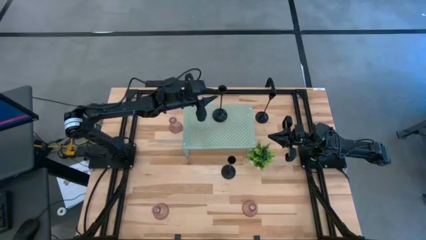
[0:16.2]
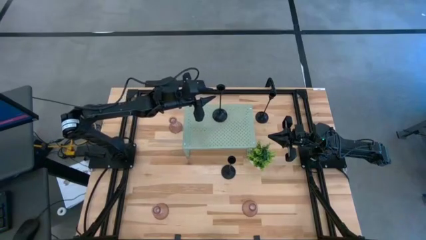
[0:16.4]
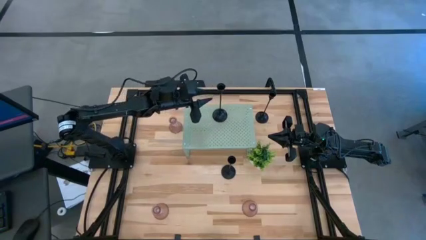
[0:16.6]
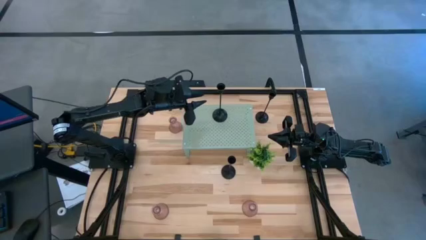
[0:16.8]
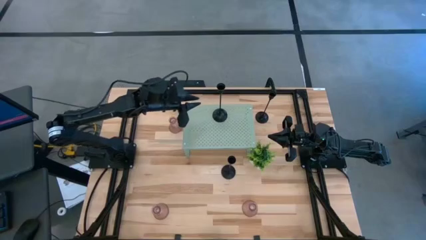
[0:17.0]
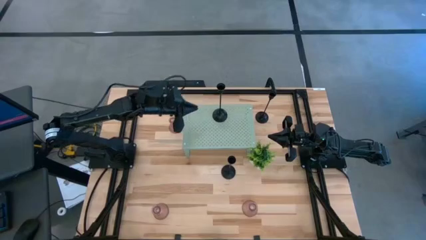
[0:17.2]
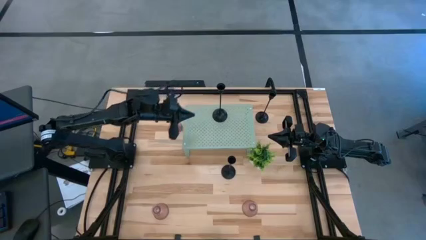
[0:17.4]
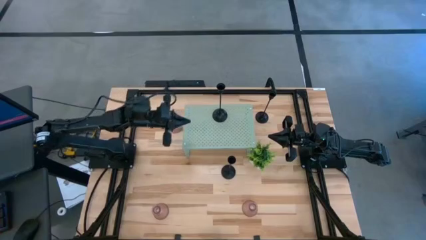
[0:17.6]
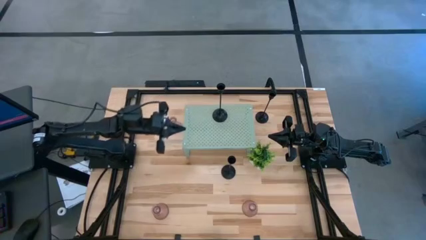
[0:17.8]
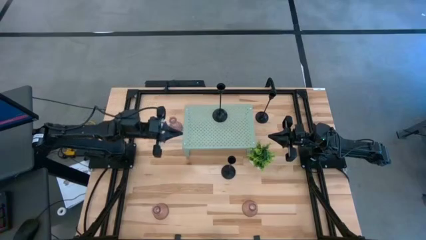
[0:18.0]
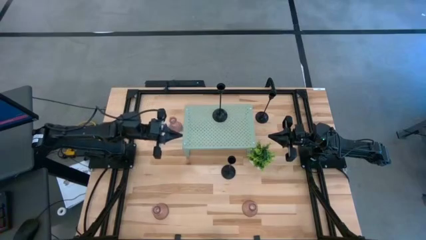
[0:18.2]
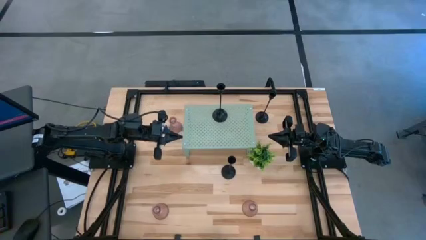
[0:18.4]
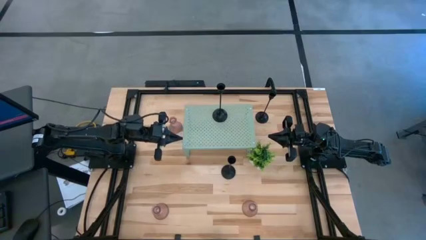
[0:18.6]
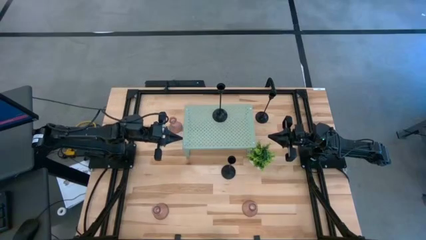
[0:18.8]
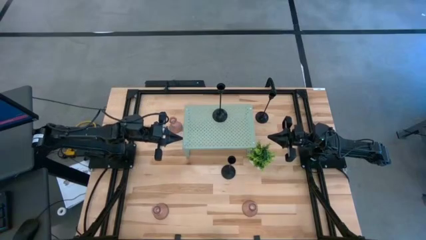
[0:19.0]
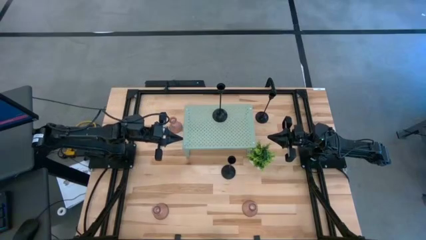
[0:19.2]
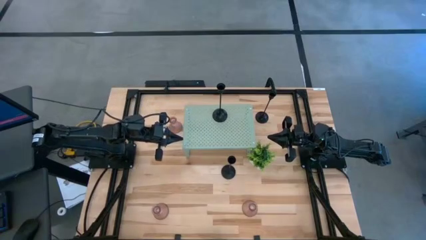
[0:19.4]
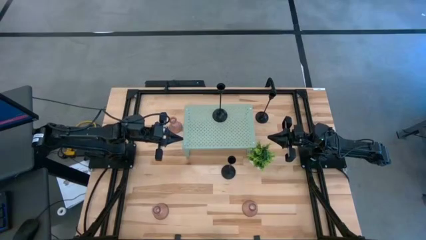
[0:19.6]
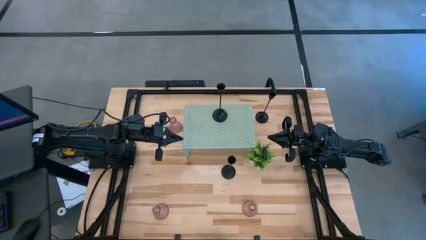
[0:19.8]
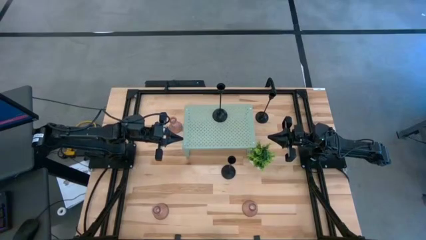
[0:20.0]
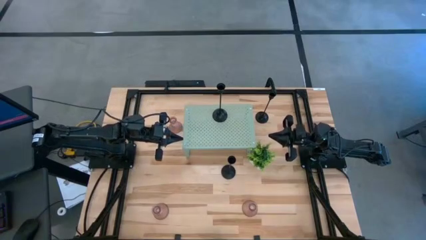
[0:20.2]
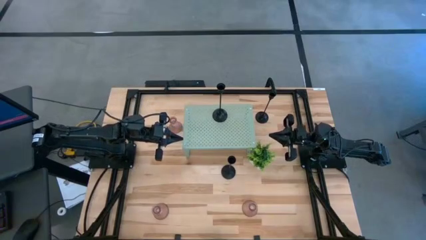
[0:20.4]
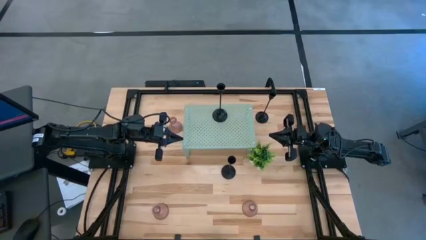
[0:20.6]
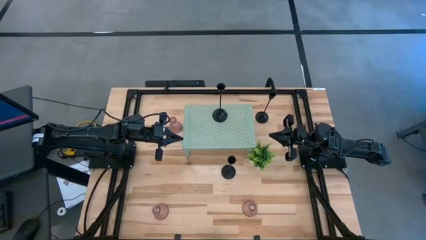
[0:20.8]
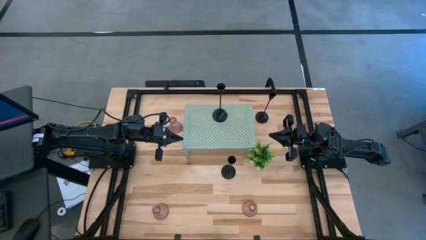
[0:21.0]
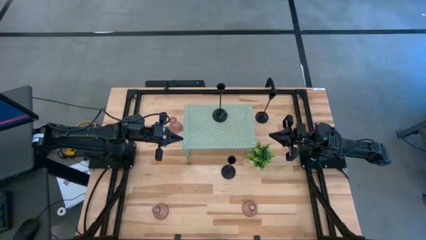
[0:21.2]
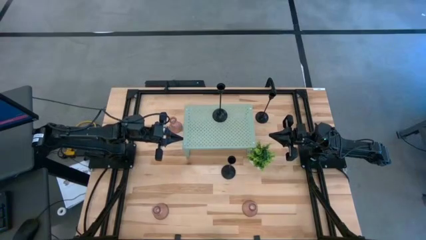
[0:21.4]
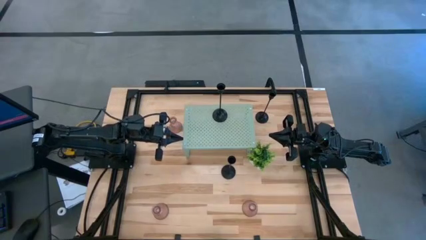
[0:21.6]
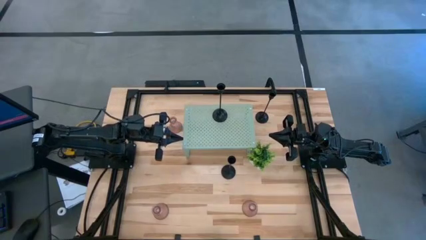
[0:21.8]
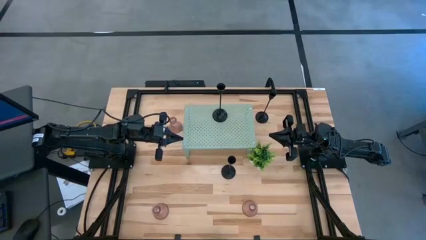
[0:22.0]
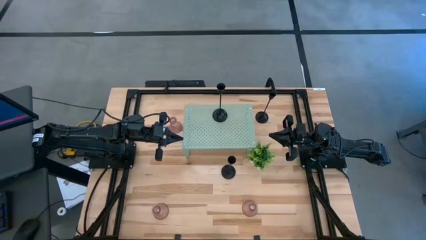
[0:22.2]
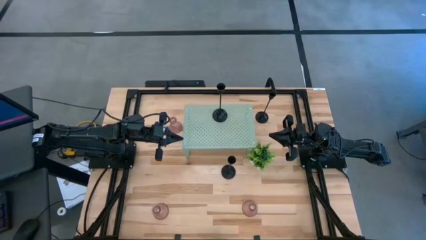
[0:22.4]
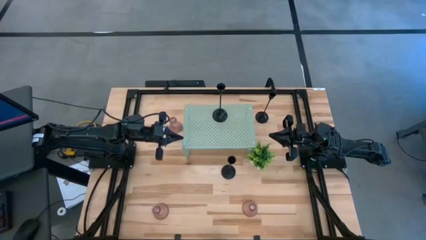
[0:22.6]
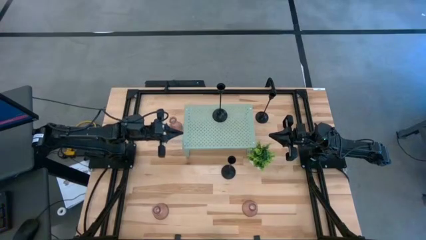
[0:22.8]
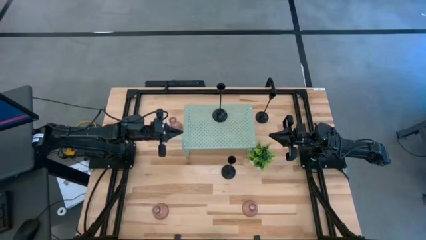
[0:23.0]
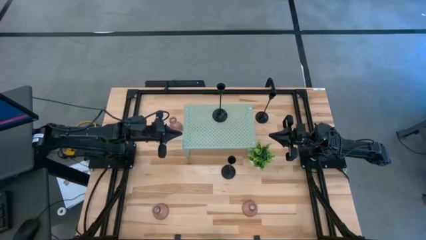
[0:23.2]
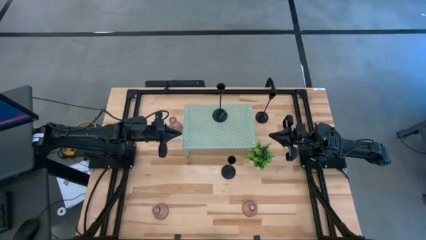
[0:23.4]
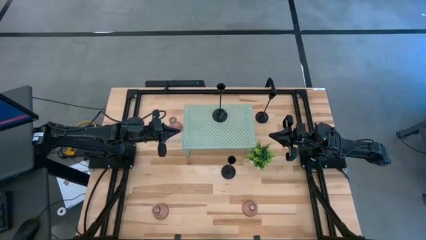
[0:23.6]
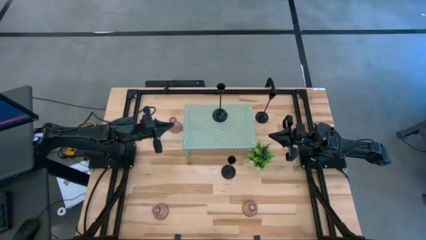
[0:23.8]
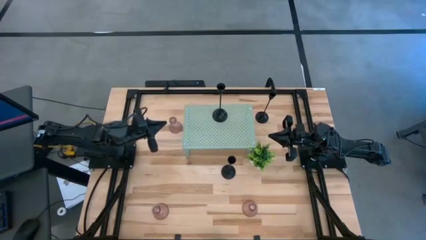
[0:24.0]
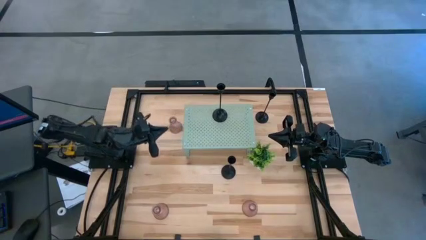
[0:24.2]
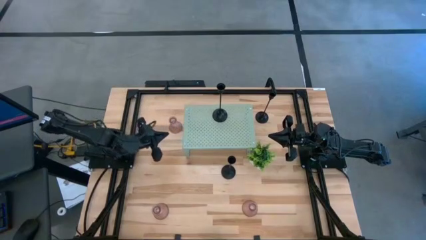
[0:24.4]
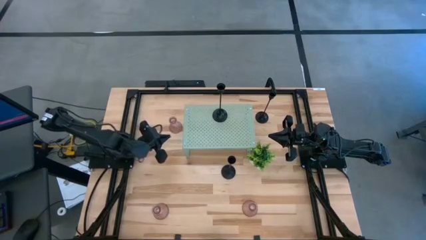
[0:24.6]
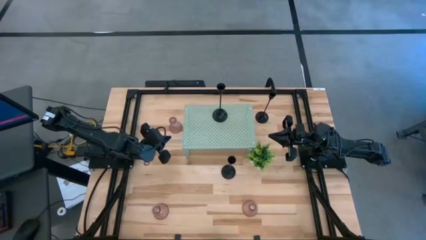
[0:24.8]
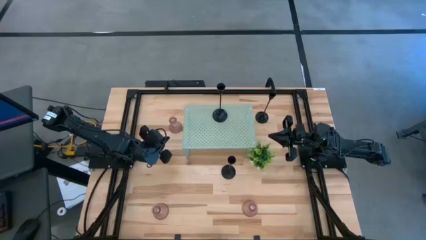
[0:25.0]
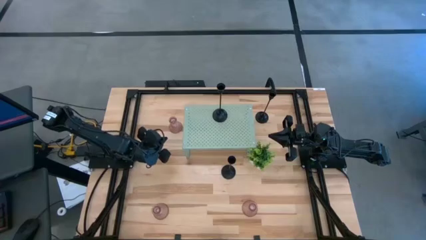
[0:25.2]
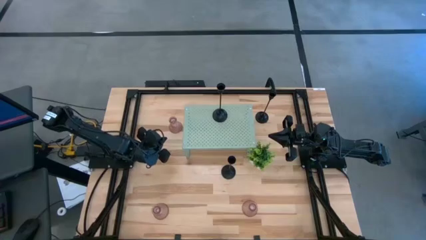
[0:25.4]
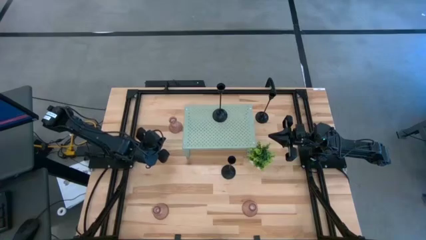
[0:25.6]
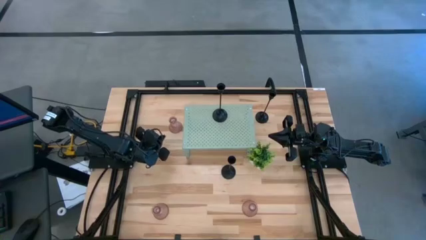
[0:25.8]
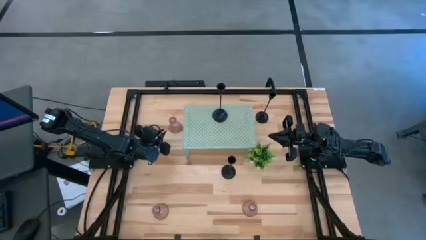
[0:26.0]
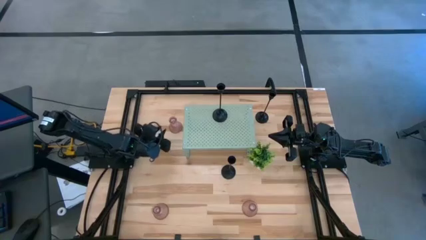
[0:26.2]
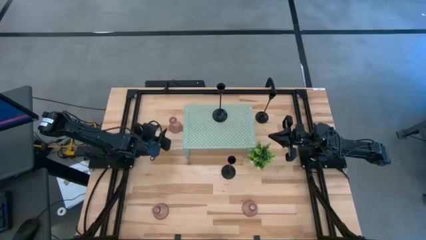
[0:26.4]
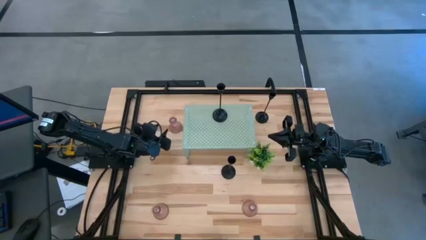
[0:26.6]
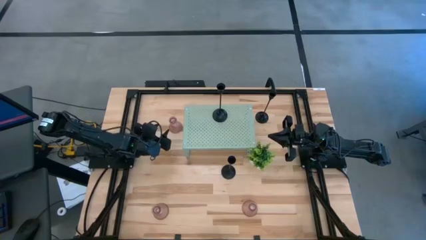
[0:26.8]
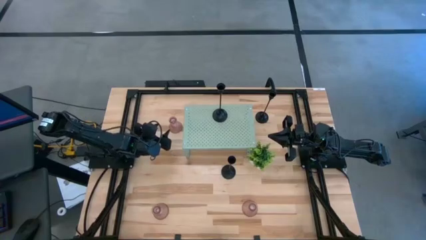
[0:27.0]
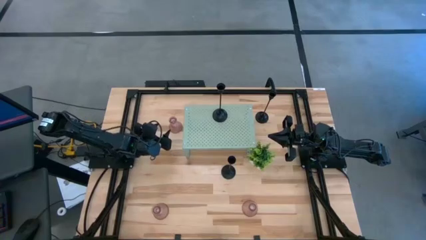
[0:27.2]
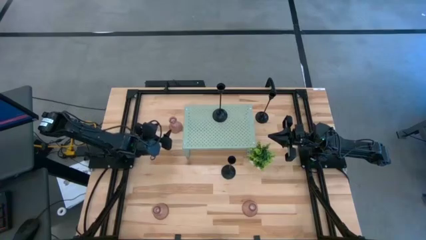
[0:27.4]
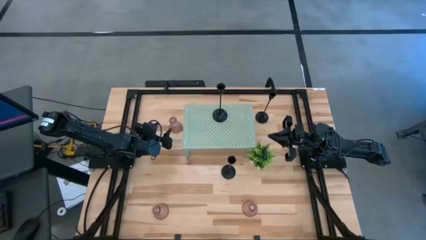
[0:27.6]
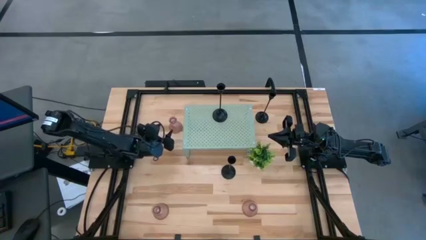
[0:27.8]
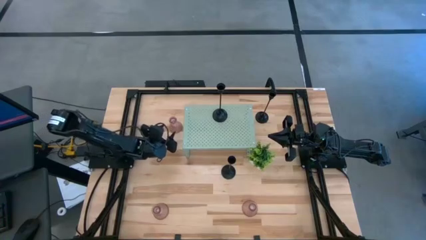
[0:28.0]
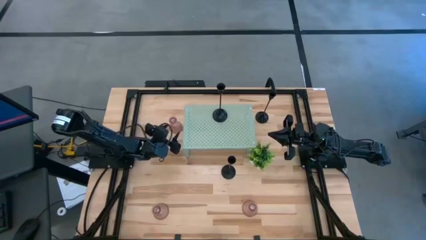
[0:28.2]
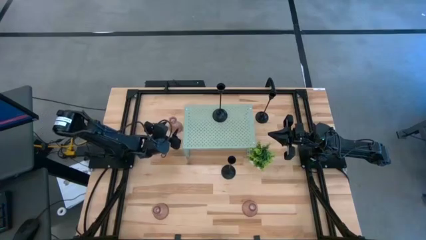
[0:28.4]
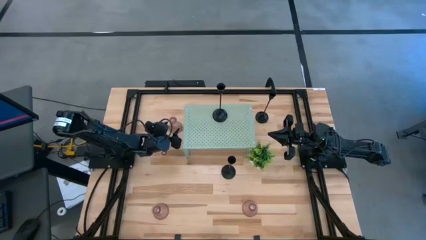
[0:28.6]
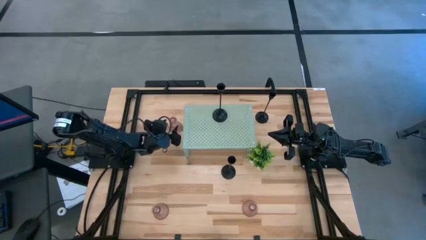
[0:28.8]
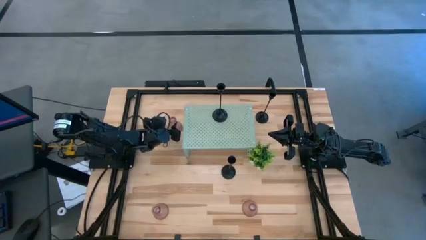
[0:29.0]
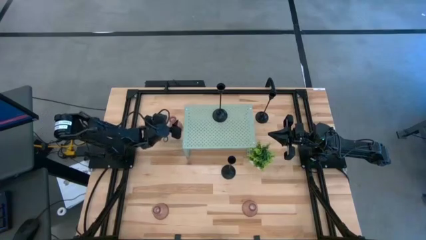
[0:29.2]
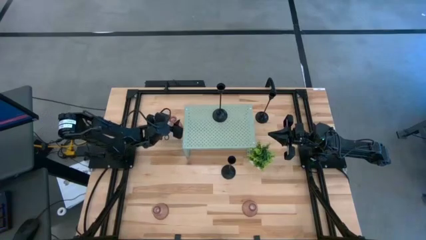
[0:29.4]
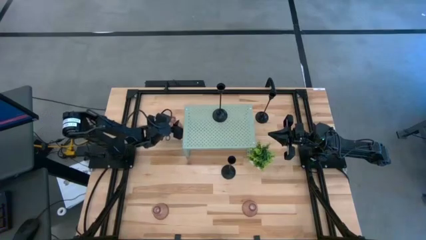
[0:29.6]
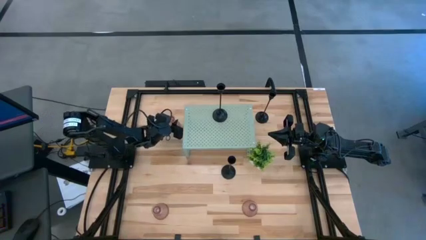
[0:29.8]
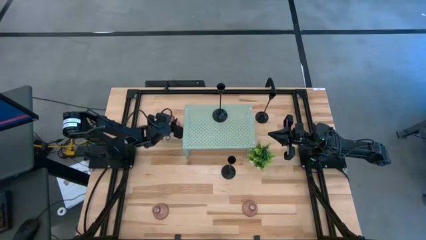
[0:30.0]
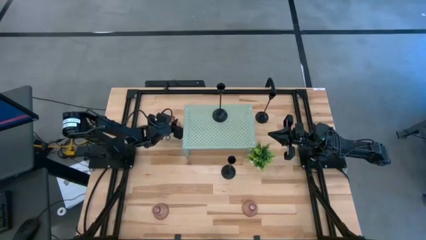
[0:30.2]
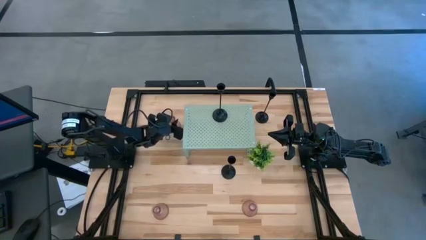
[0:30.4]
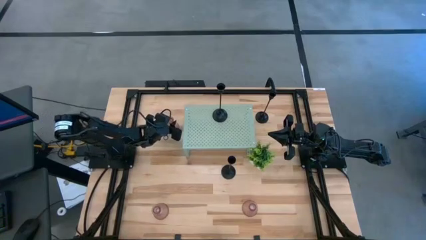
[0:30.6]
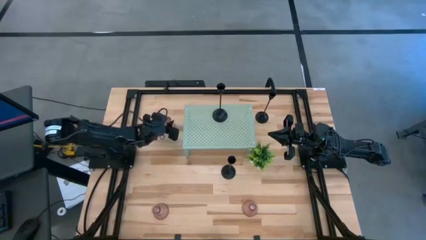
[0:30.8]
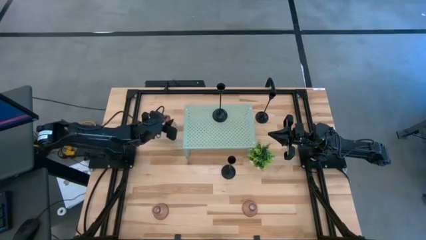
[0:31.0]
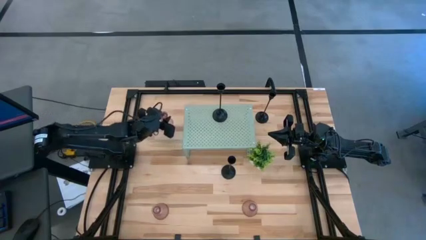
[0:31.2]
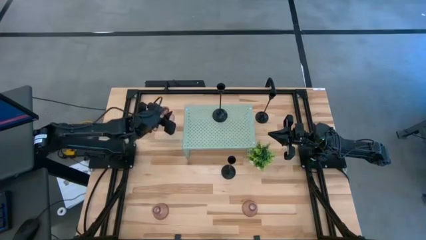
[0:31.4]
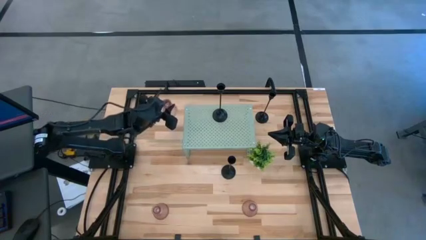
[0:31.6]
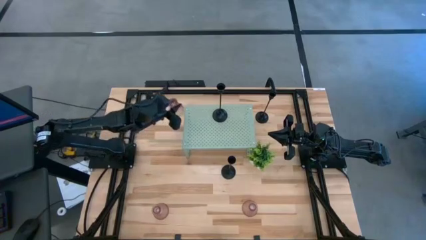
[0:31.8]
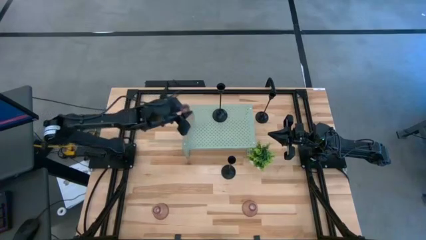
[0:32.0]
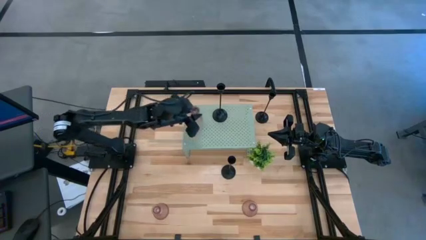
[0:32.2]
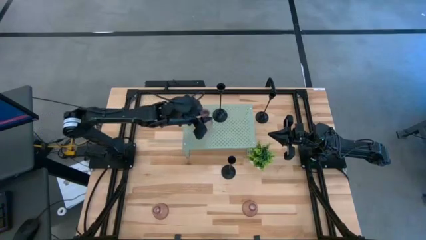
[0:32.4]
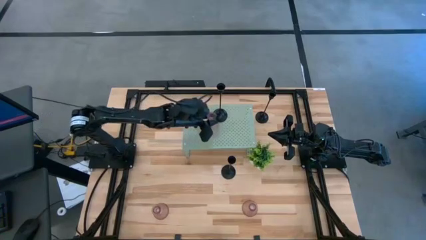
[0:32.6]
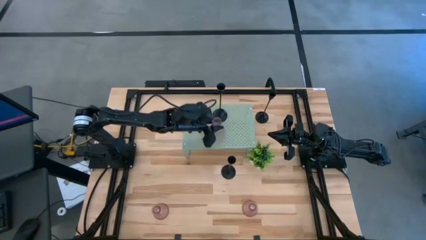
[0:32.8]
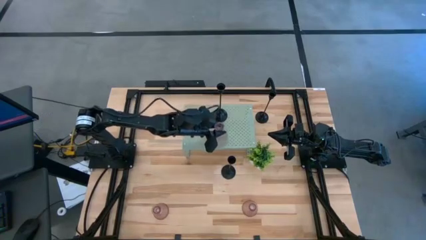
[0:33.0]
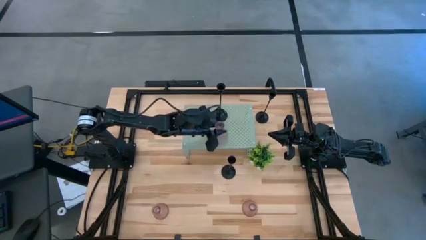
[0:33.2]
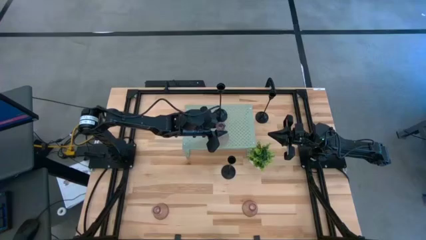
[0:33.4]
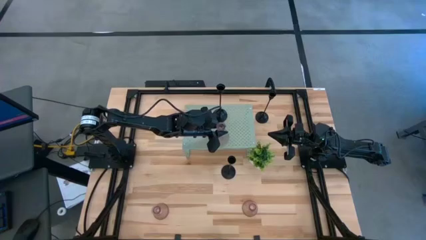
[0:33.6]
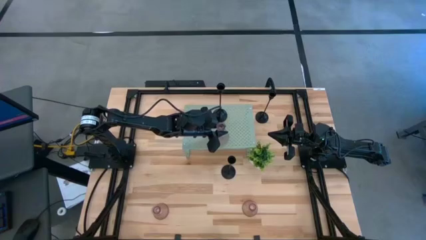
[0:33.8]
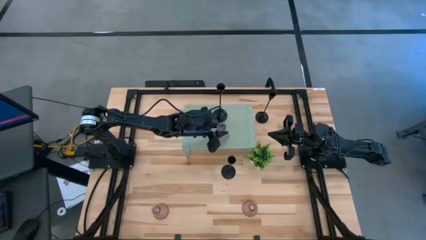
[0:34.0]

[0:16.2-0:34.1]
Task: Pick & Place candle stick holders
Put the top pink candle holder on the shelf
